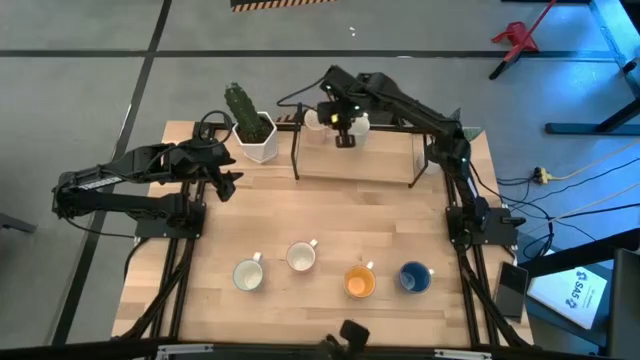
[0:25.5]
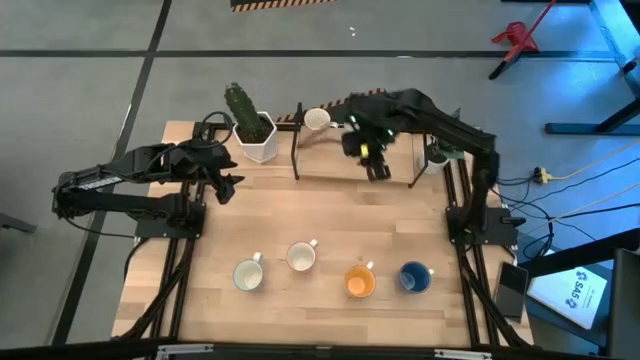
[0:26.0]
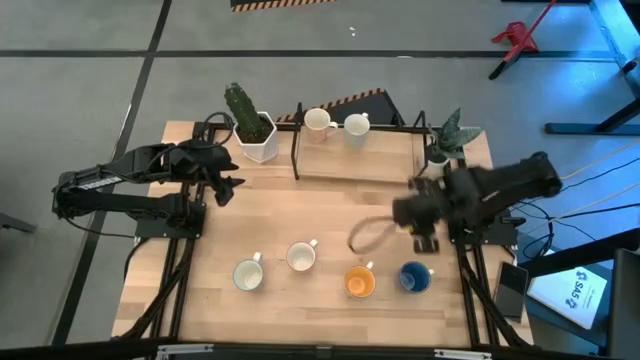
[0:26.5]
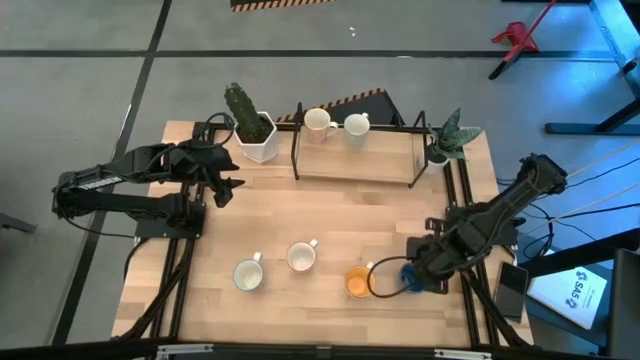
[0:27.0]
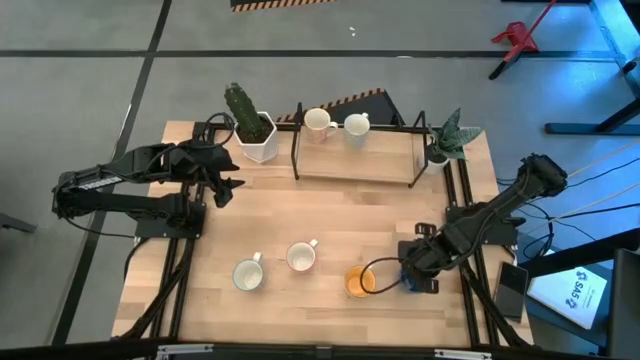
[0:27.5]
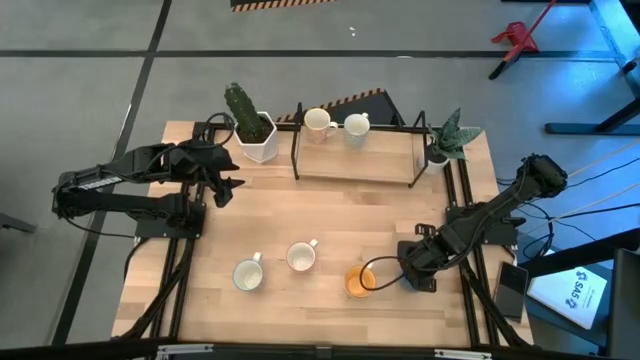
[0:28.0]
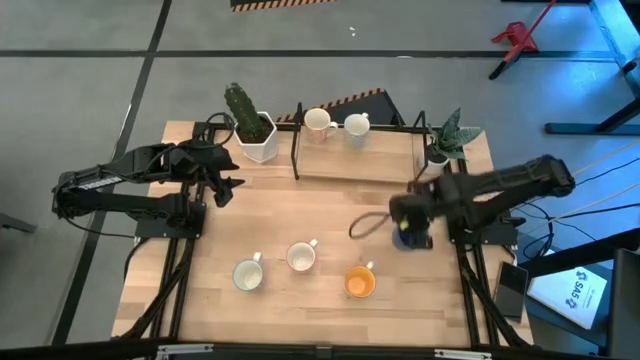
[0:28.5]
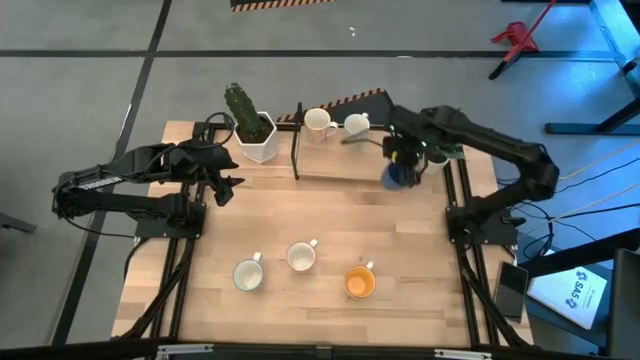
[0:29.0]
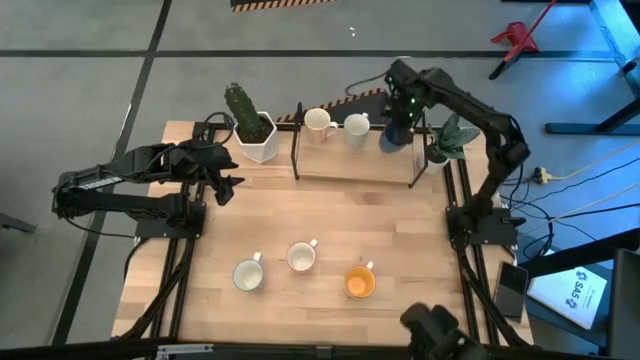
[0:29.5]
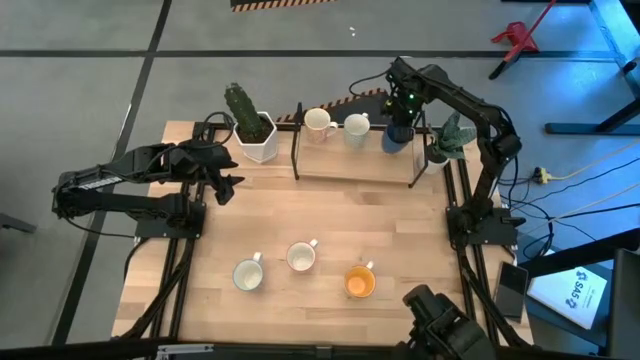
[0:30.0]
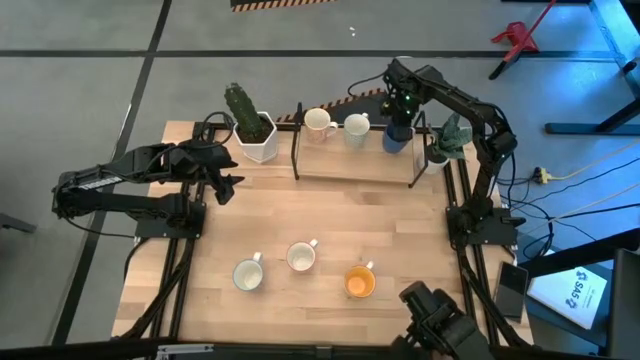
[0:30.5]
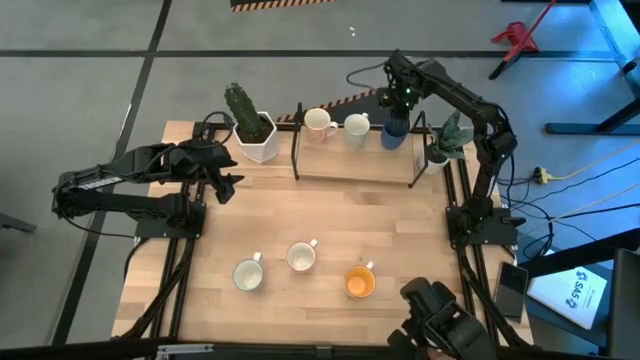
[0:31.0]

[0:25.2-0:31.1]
Task: Place coffee mugs
Put the dark blue mug on the shelf

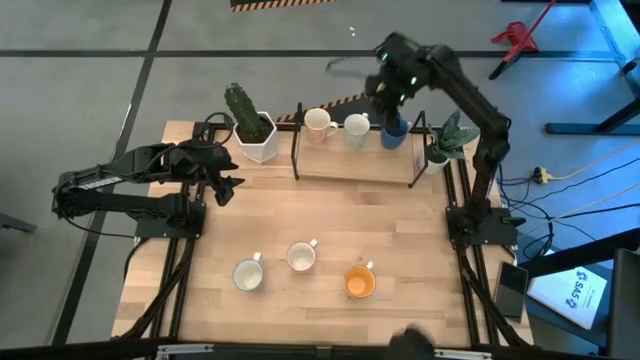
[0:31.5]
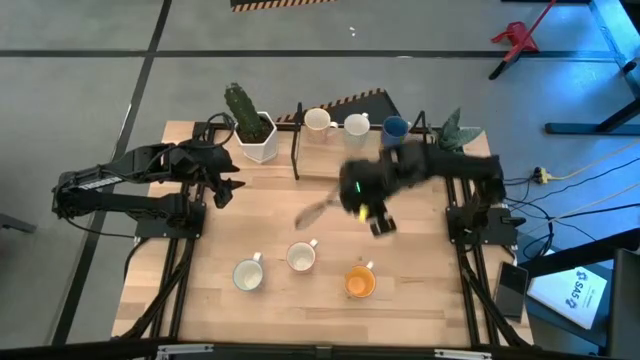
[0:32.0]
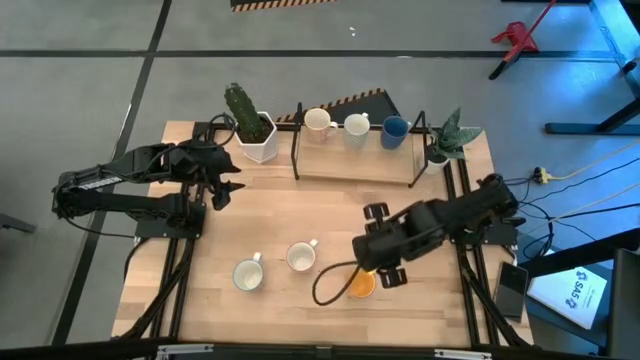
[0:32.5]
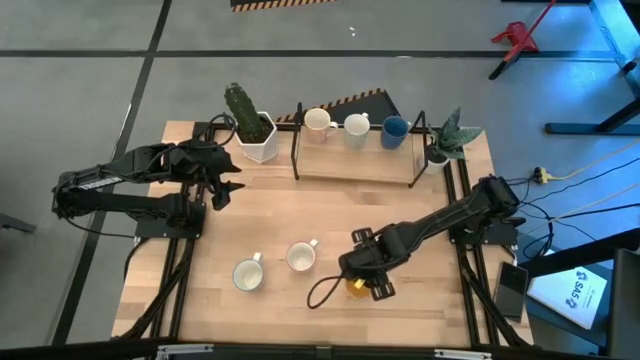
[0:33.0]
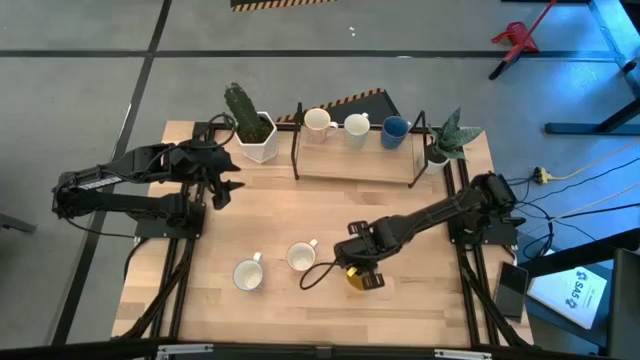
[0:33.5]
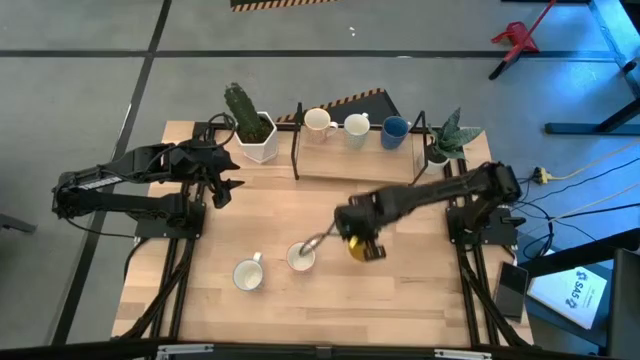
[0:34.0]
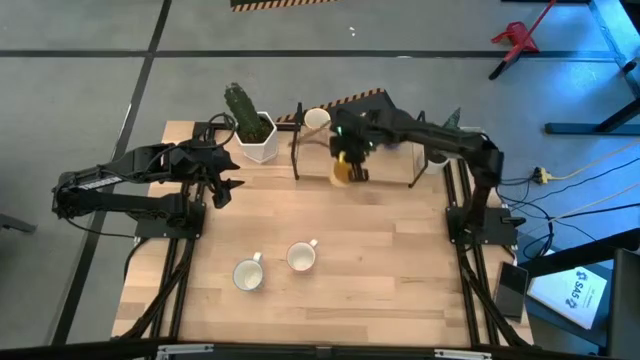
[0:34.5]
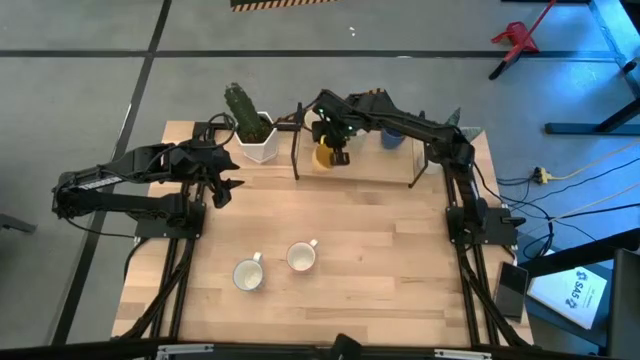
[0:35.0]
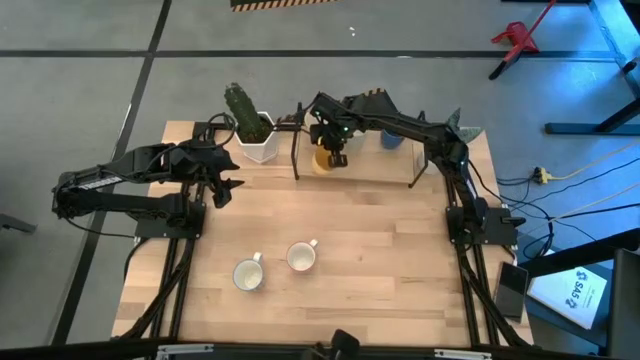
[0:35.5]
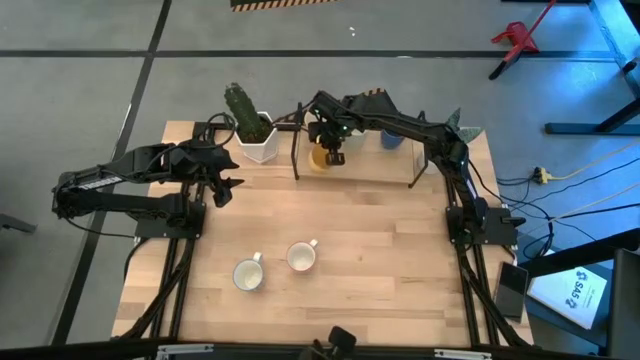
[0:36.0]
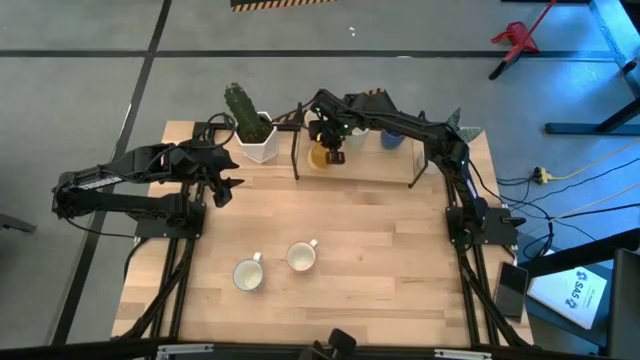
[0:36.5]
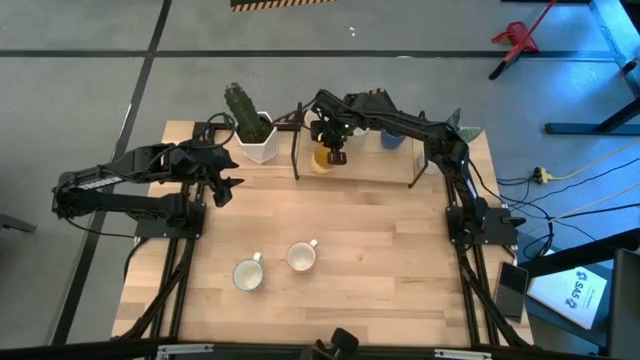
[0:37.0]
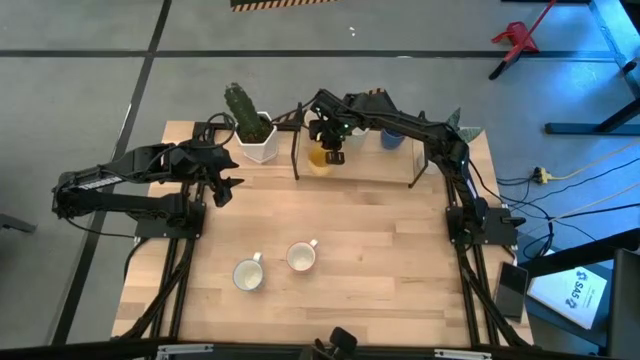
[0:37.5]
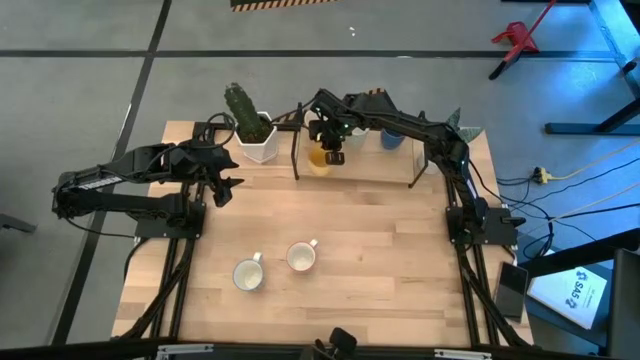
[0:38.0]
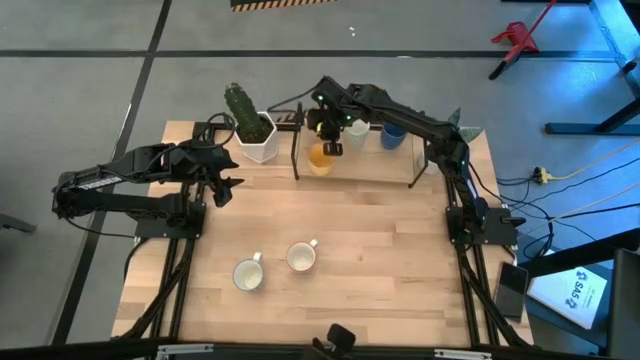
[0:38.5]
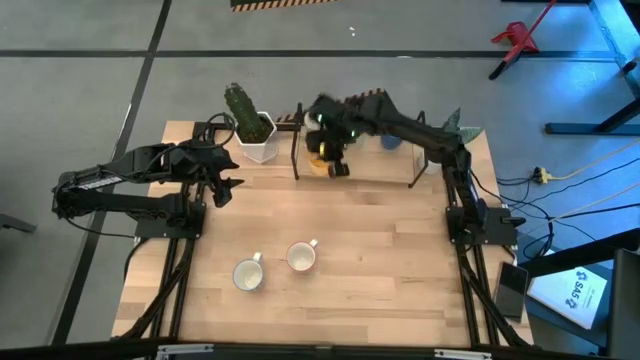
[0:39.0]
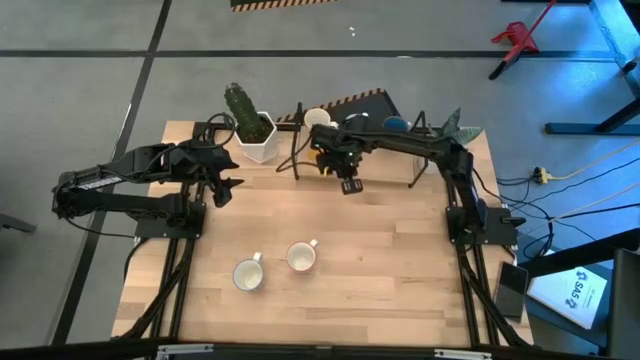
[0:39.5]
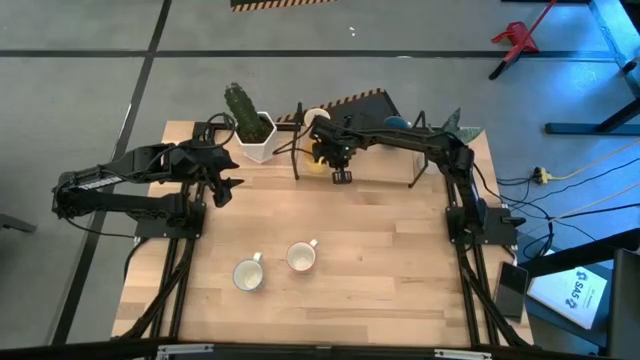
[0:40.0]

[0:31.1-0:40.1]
Put the yellow mug on the shelf

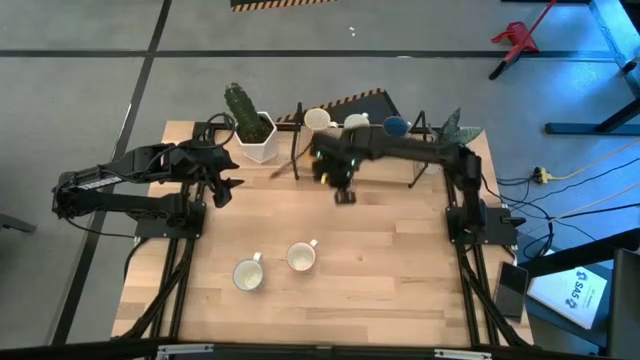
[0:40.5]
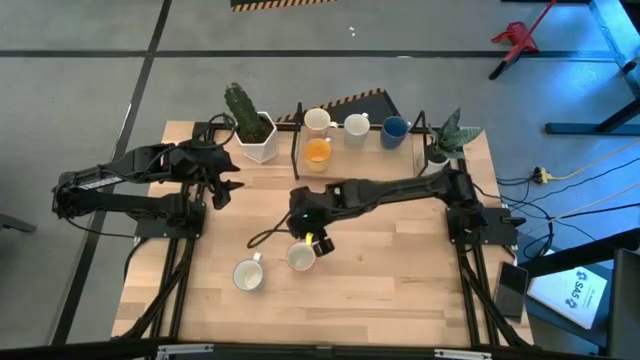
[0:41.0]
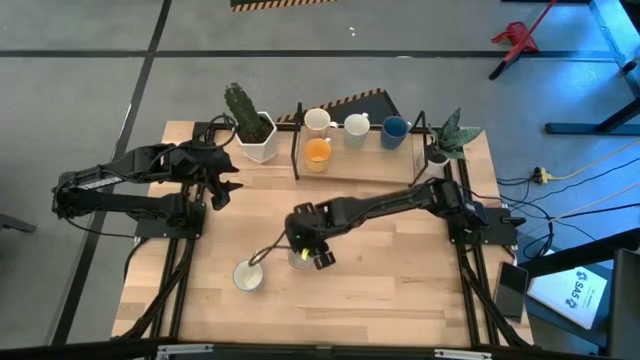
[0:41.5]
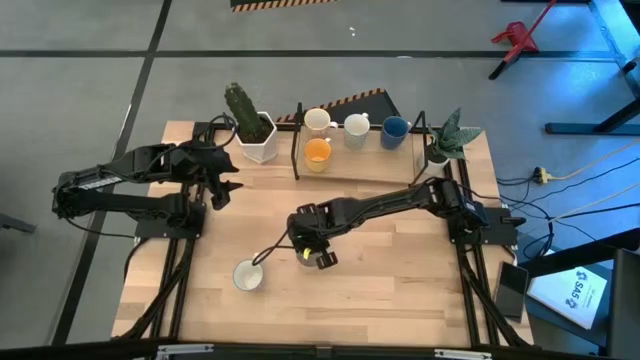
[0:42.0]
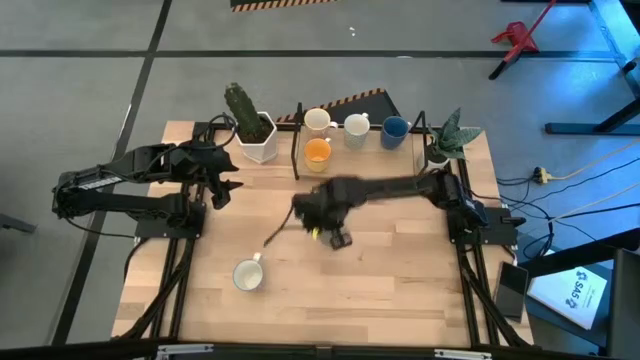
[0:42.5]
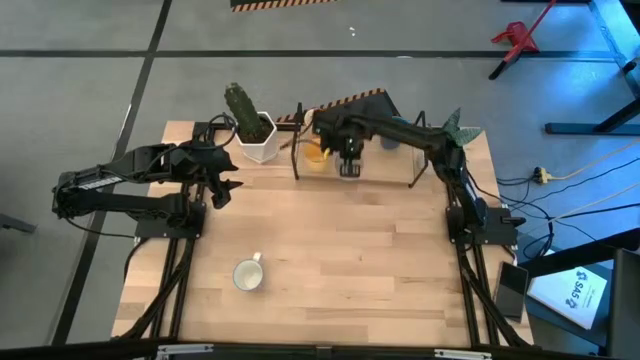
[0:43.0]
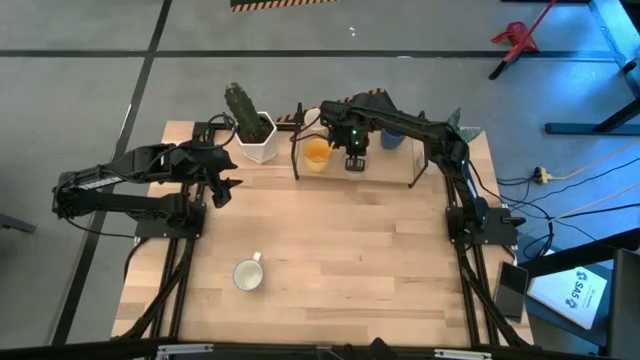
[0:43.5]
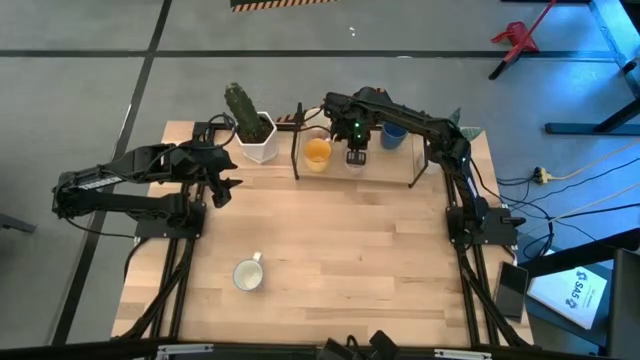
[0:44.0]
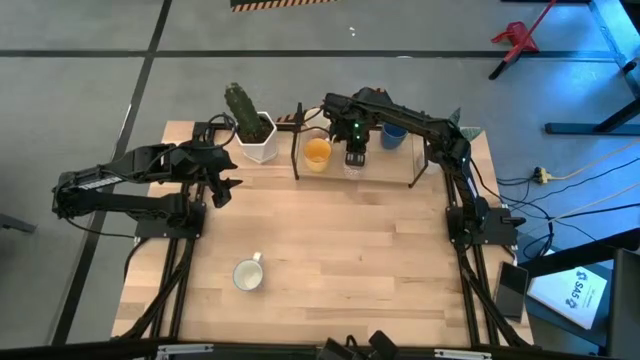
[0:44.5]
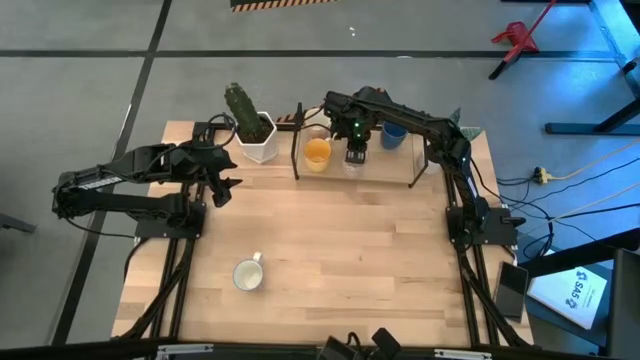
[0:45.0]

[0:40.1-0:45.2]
Put the white red patterned mug on the shelf

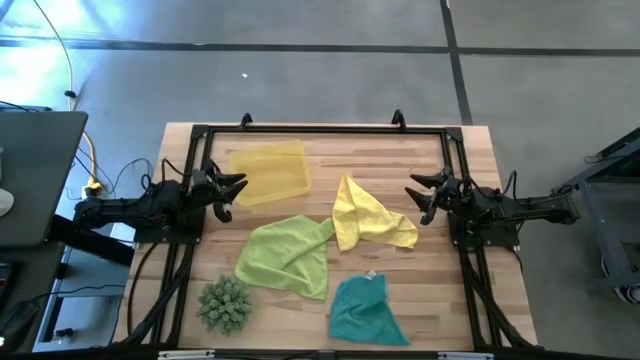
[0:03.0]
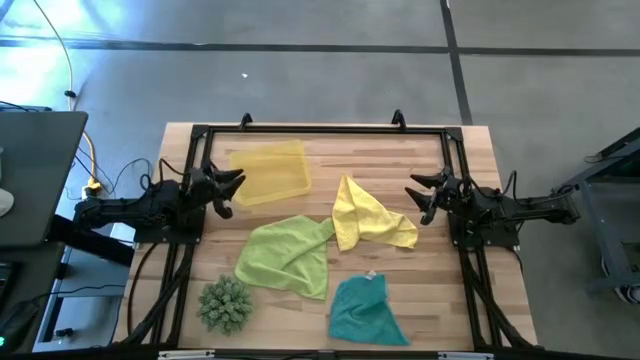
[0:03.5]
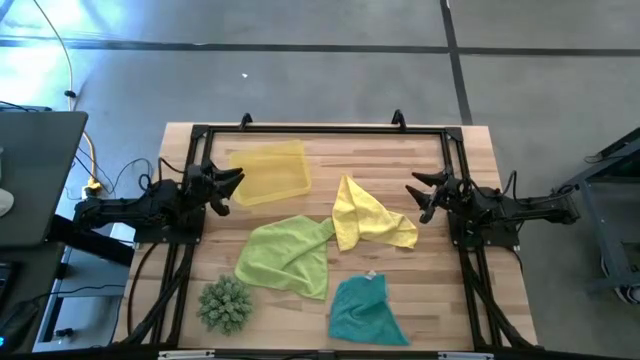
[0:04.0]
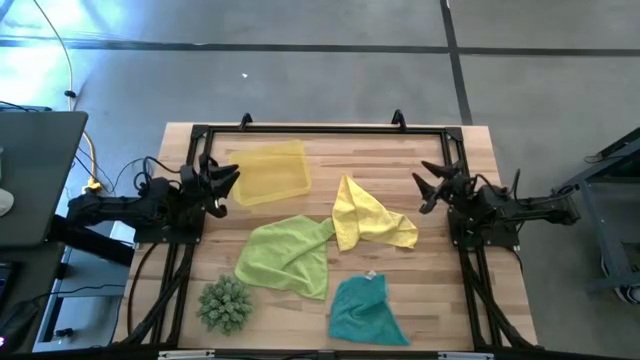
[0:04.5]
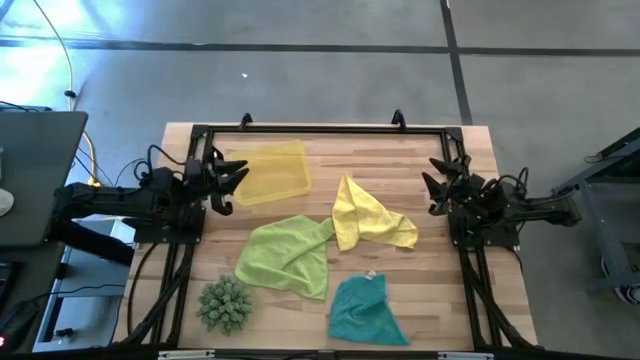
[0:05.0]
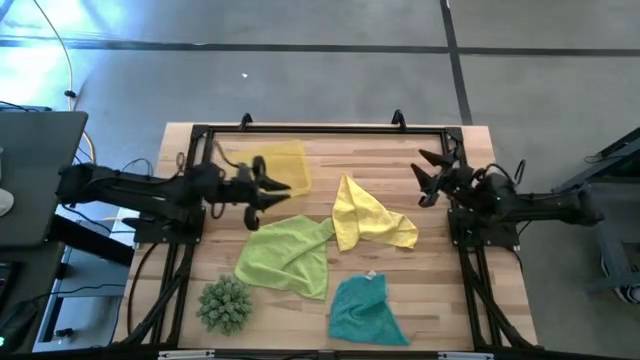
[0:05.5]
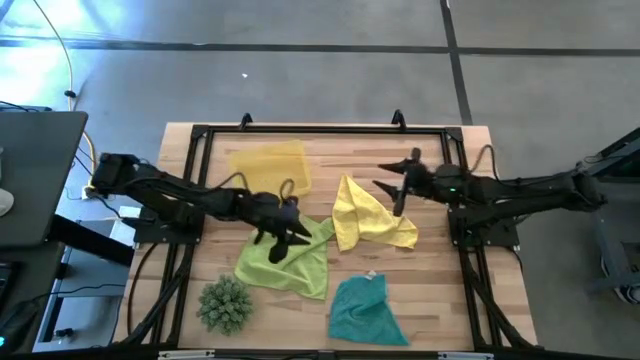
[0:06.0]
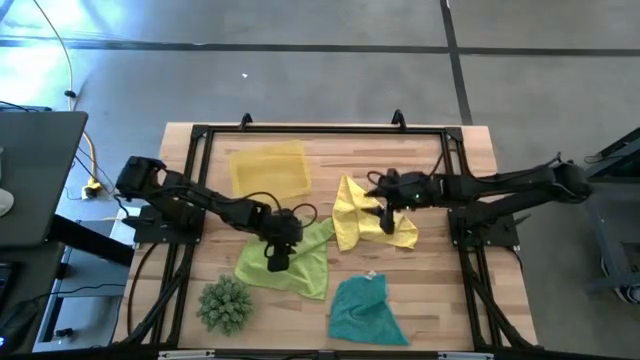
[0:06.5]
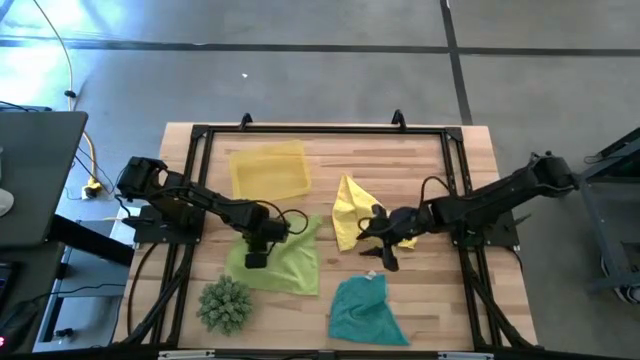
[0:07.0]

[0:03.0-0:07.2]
Task: Roll microfiber towels into tight, uniform cylinder then place into a basket
Adjust the green microfiber towel
